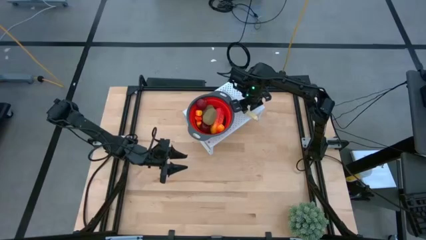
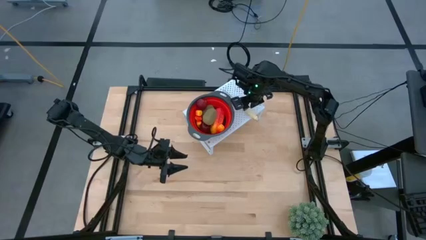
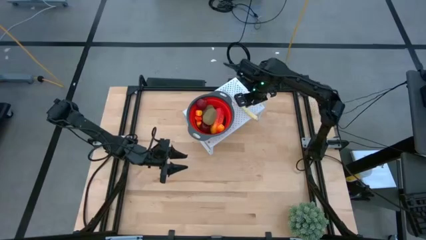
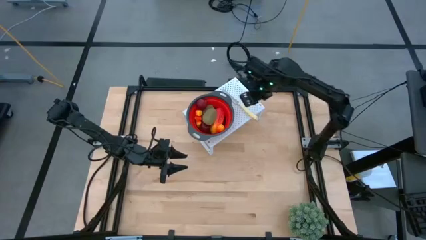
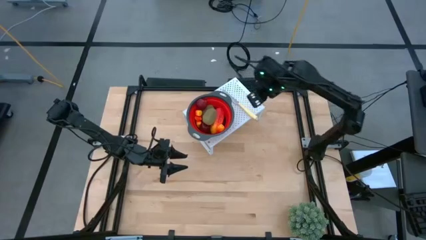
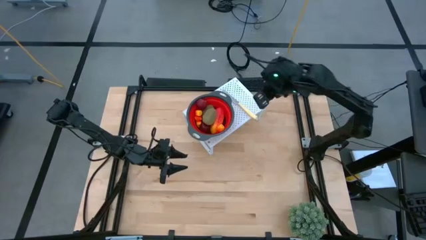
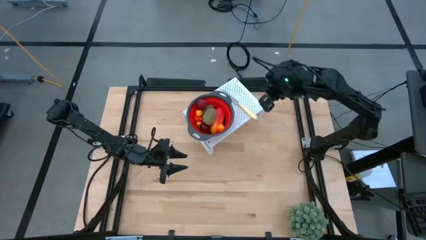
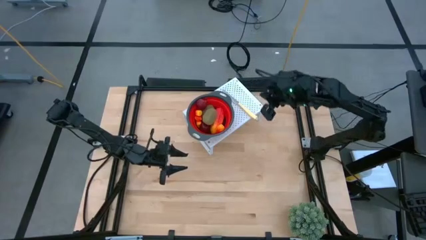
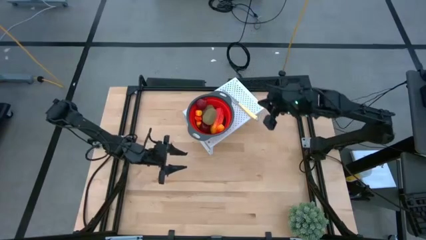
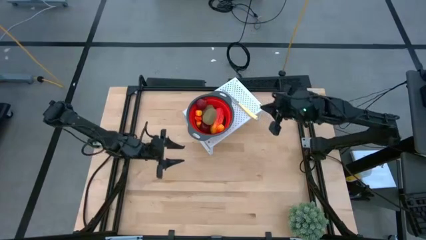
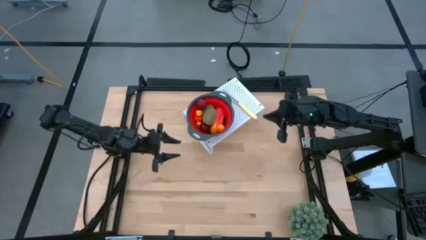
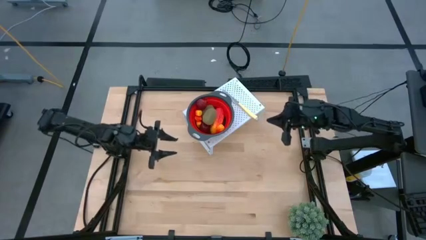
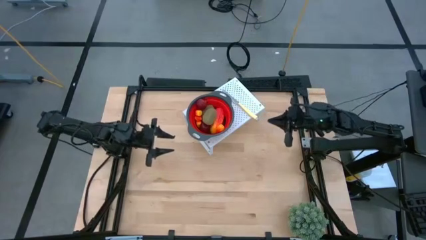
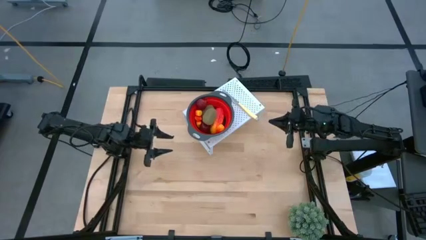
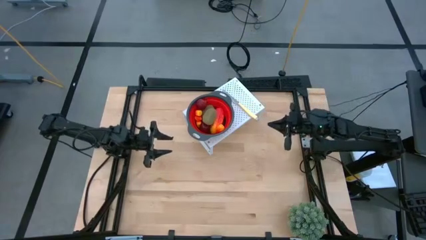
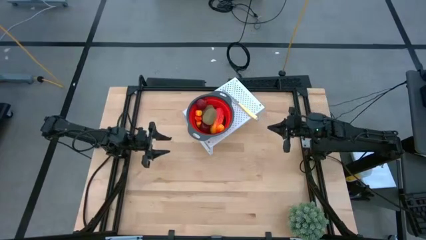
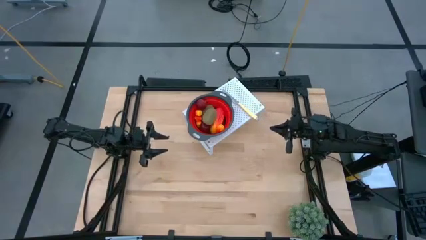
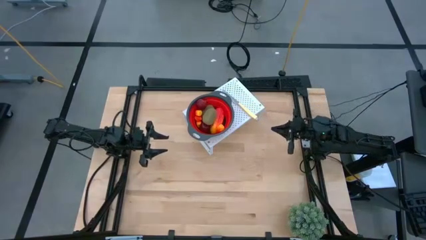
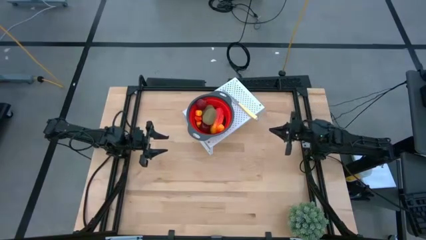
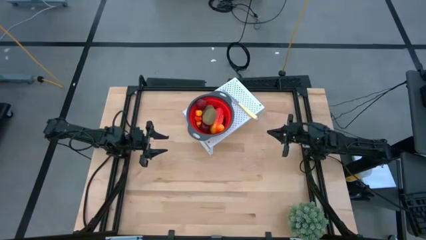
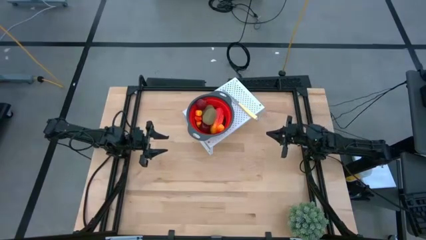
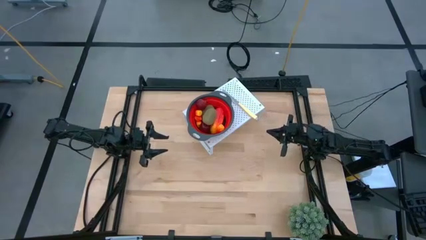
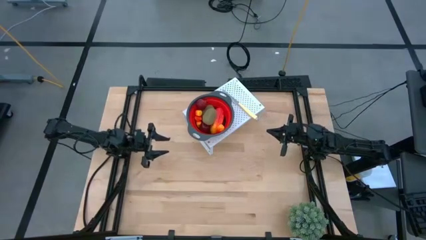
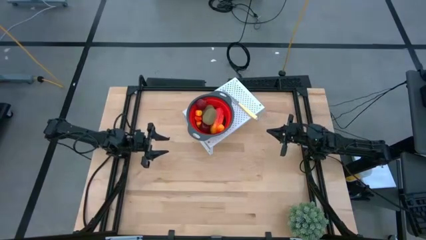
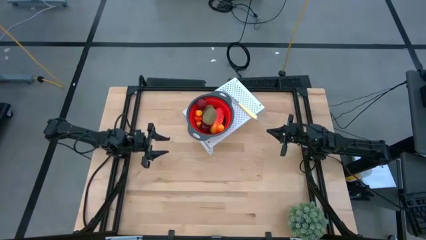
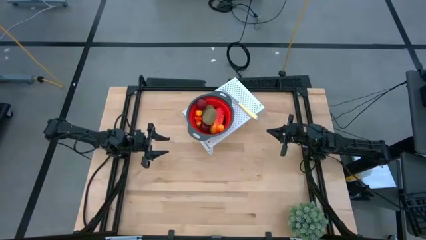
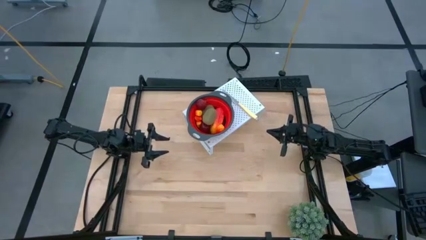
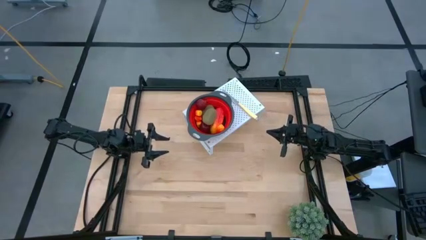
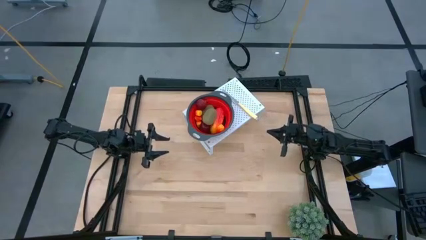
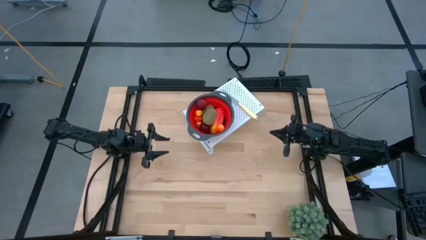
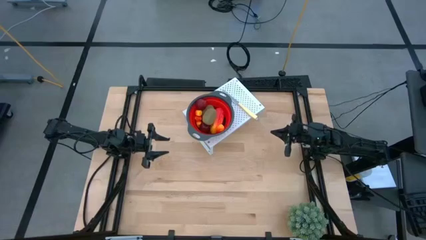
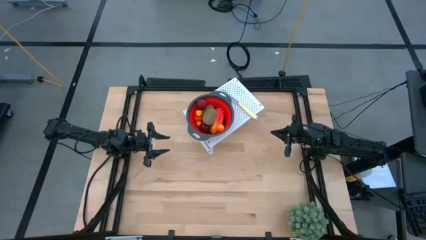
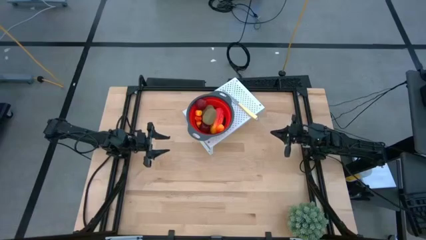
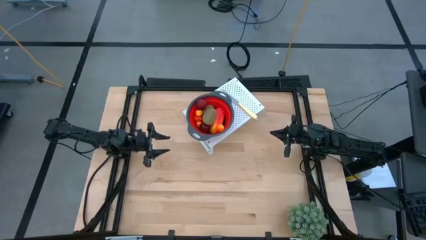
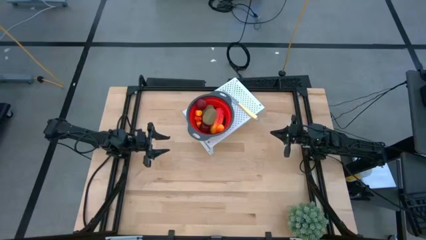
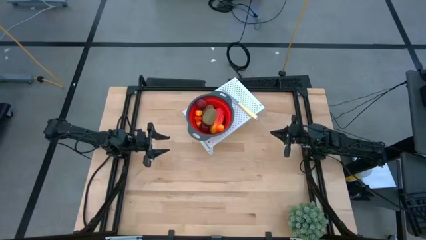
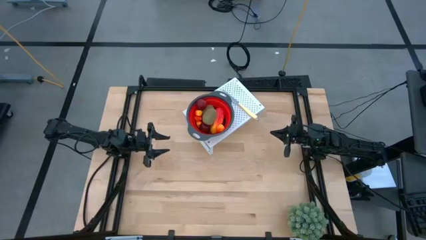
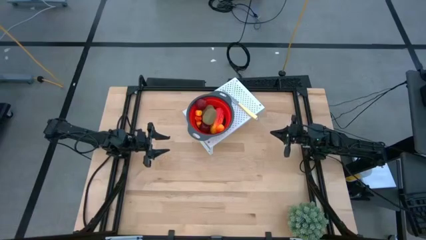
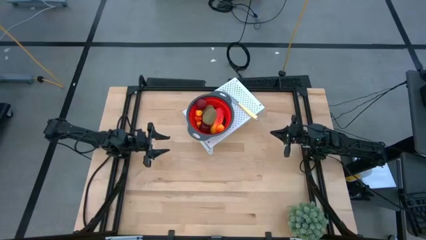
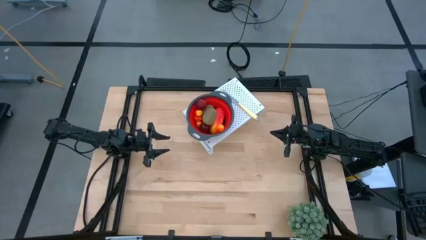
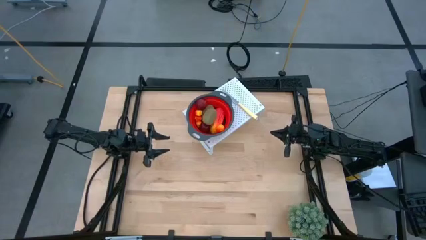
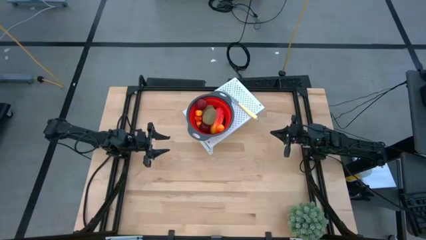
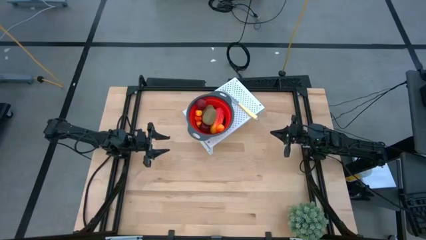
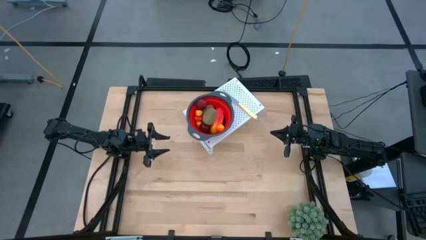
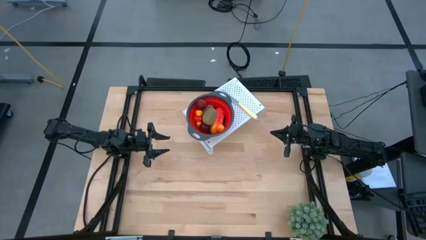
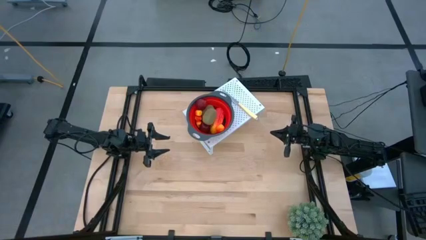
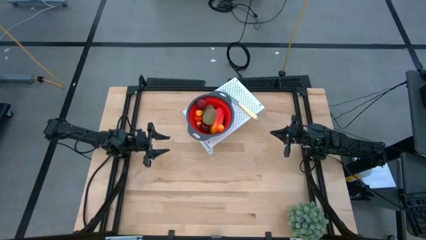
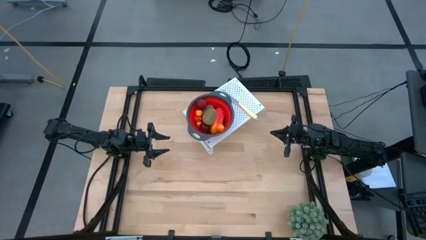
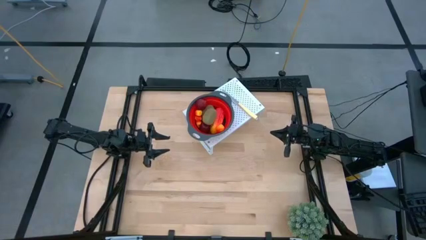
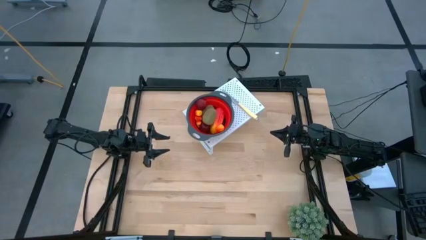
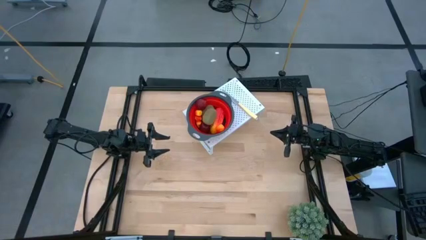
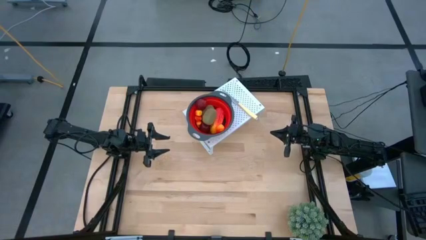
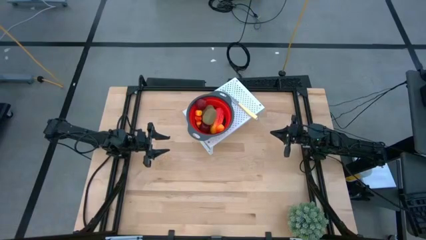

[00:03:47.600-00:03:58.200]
Task: Pick & Place Fruit
Return to Home Position

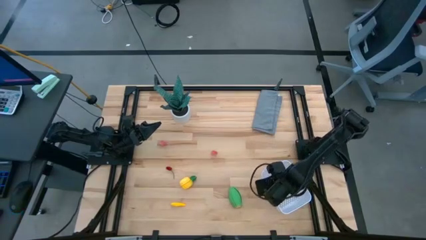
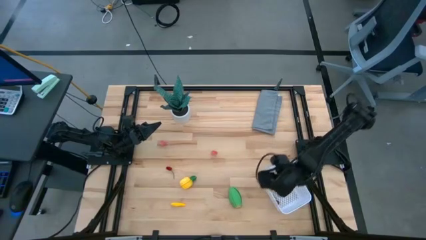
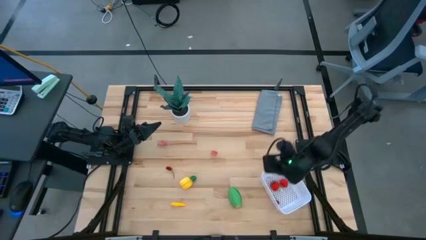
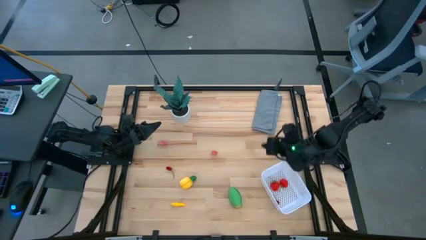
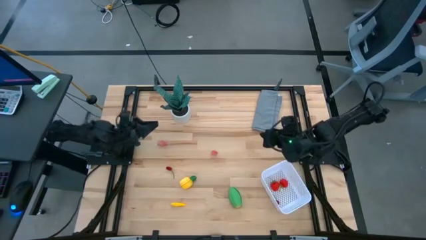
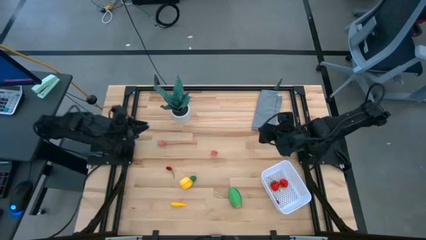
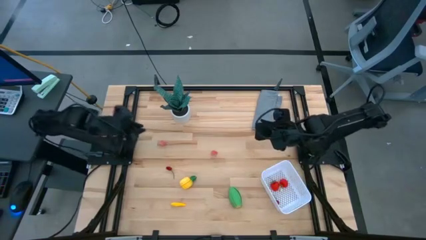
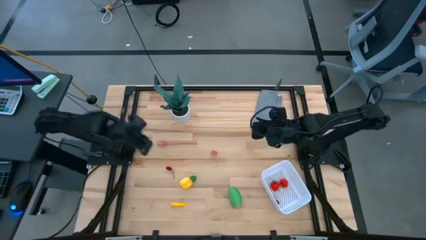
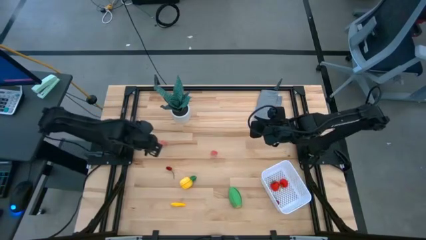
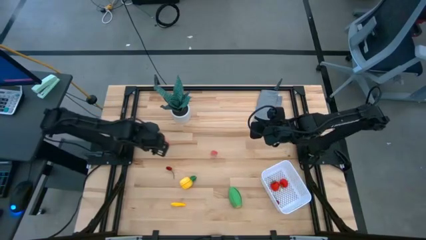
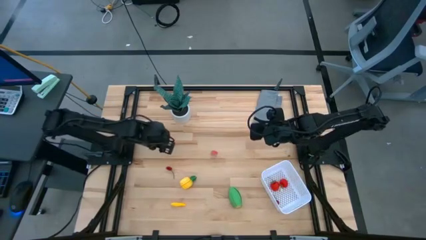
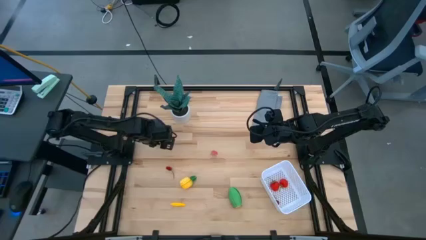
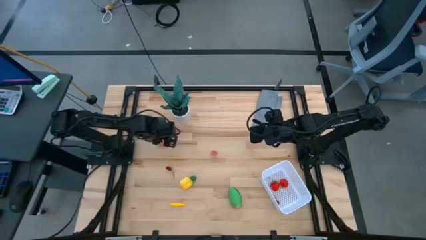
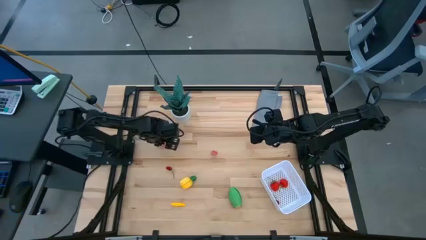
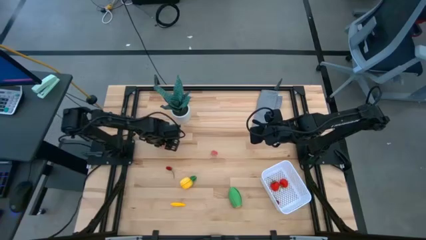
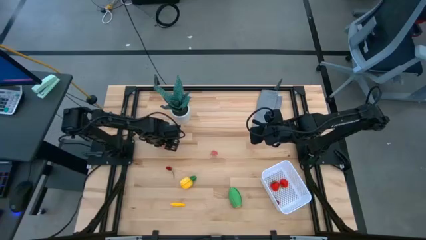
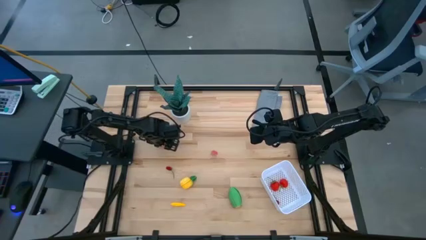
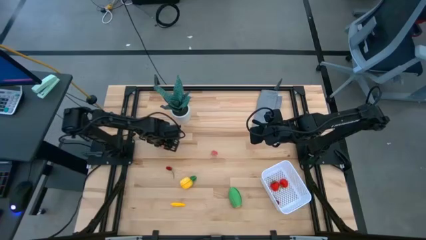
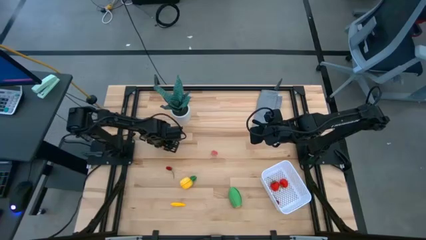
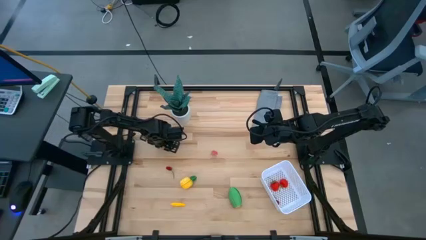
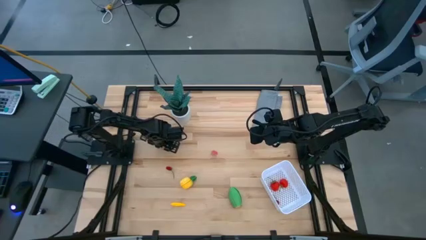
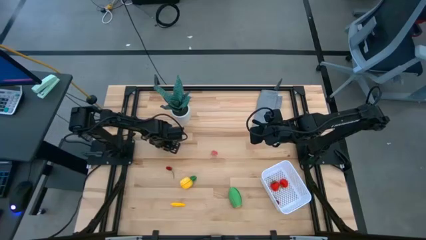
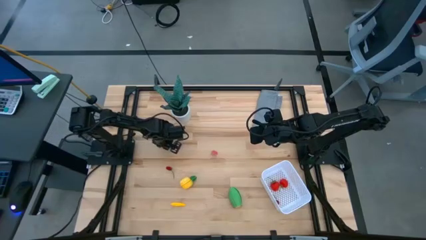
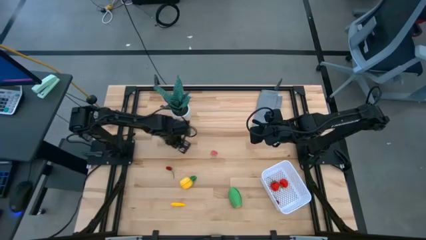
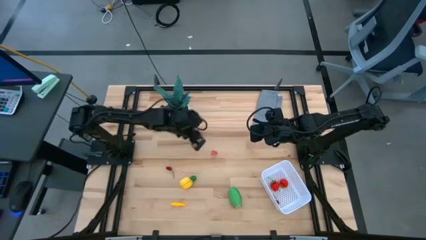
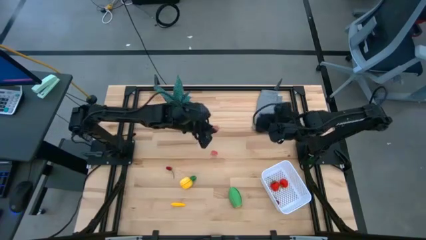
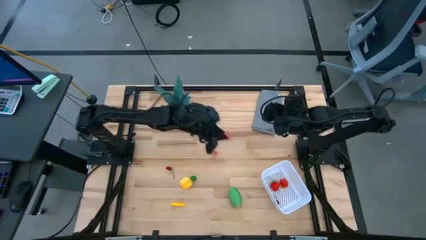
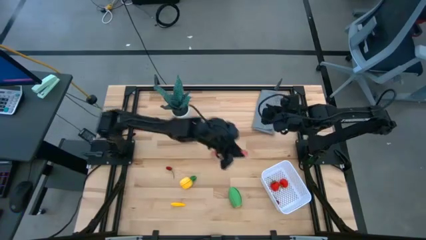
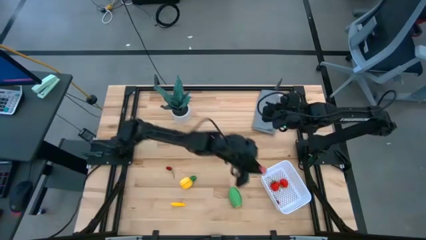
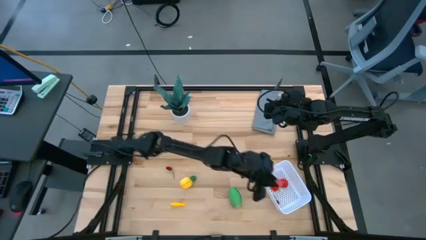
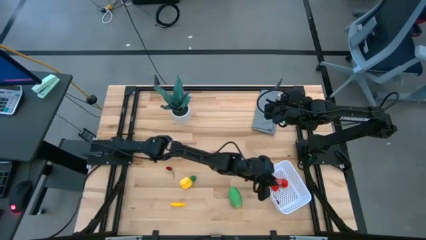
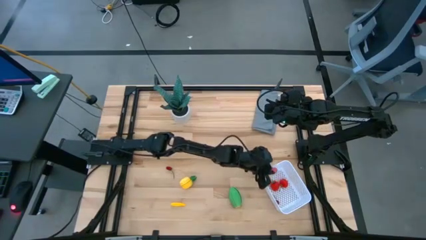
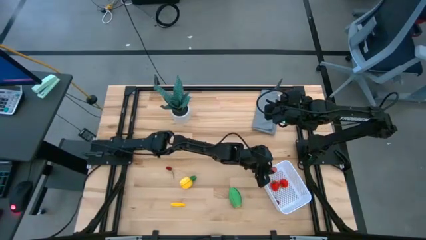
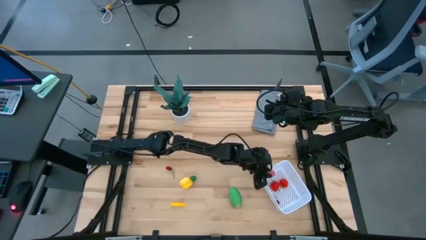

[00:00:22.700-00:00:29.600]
Task: Pick and placing Produce into tupperware
Put the left pink peach into the white basket
